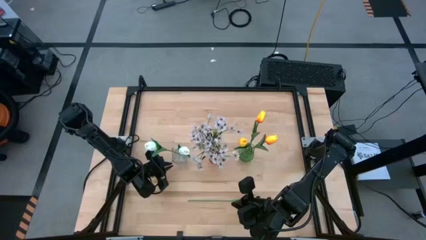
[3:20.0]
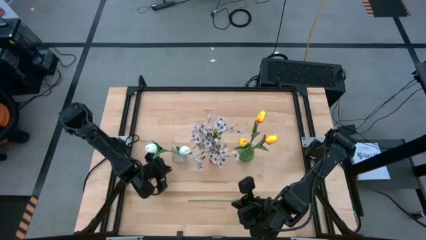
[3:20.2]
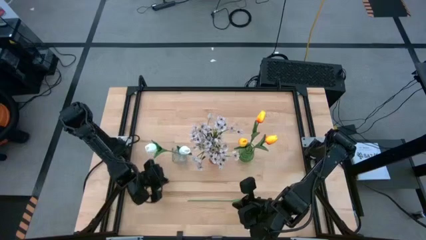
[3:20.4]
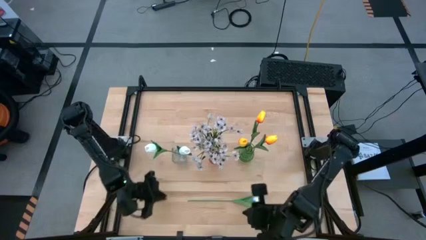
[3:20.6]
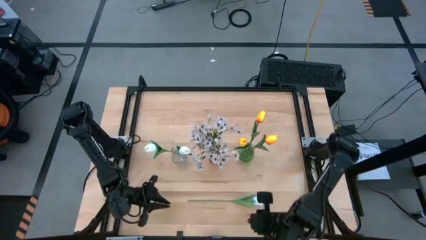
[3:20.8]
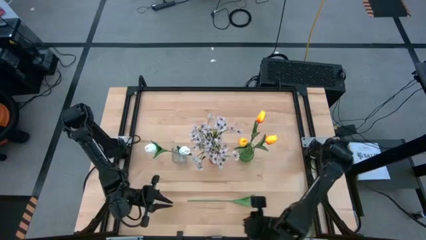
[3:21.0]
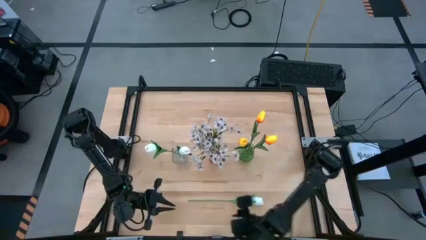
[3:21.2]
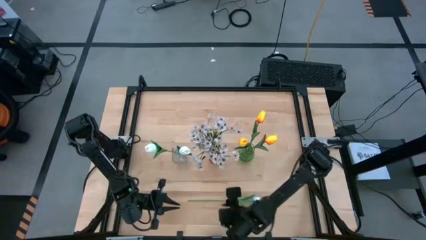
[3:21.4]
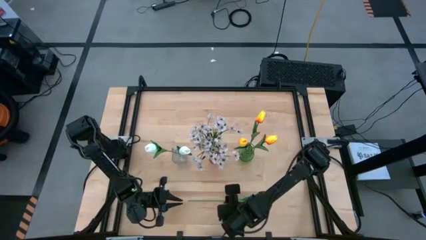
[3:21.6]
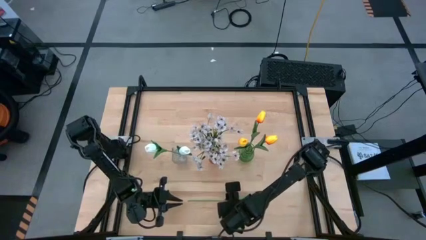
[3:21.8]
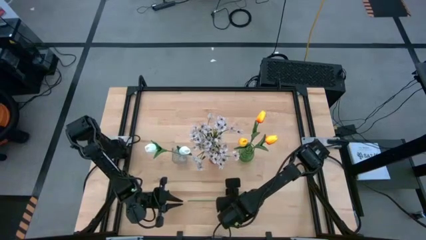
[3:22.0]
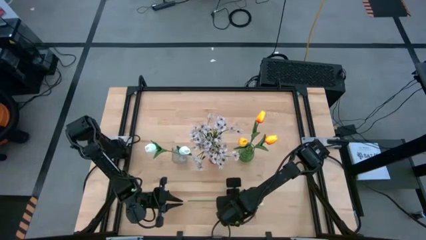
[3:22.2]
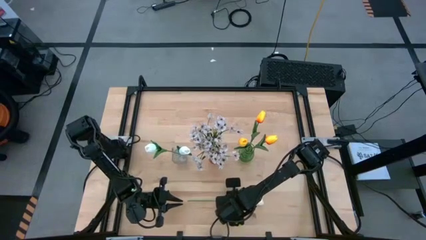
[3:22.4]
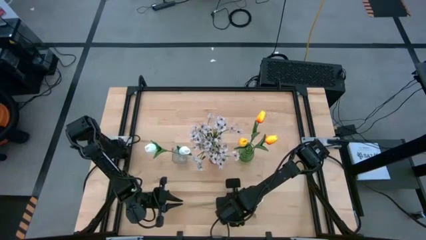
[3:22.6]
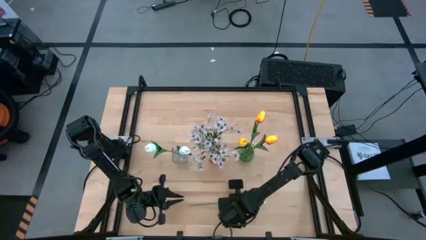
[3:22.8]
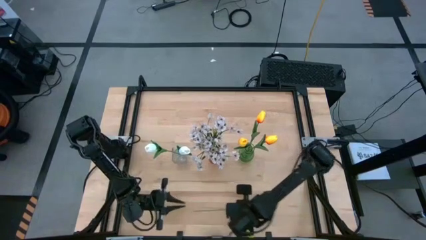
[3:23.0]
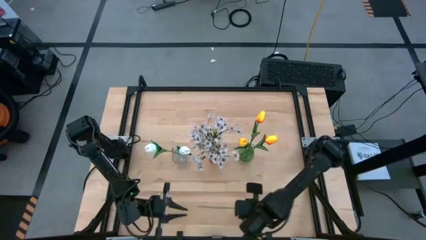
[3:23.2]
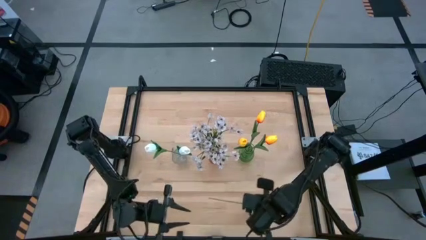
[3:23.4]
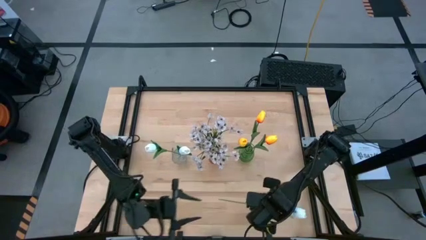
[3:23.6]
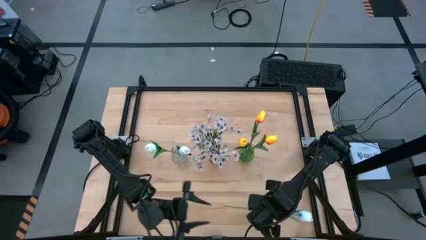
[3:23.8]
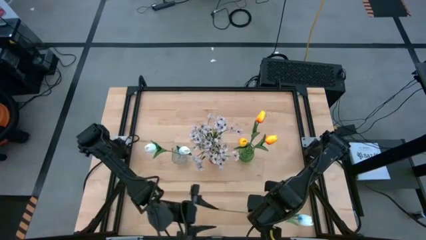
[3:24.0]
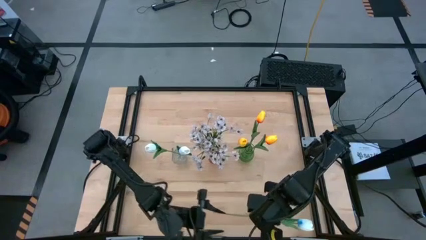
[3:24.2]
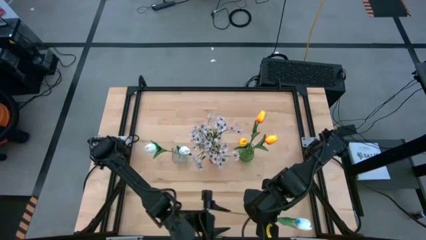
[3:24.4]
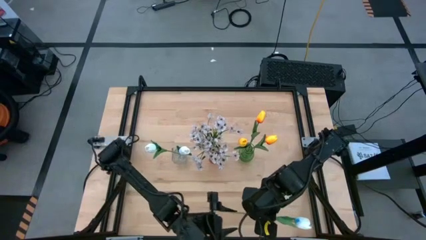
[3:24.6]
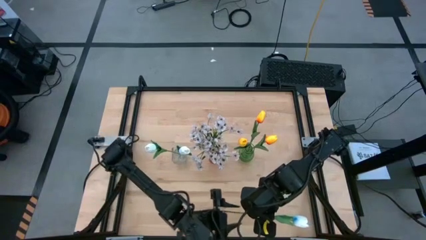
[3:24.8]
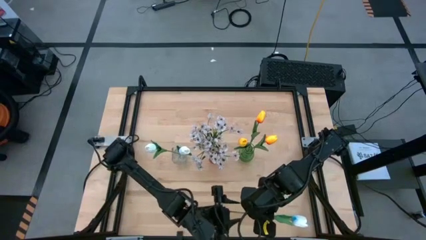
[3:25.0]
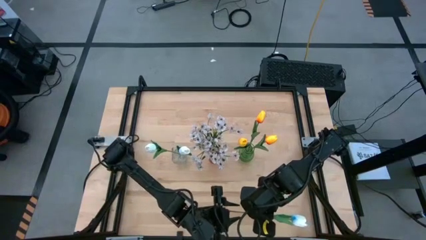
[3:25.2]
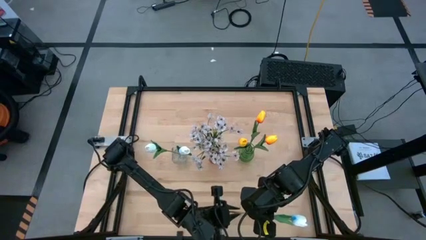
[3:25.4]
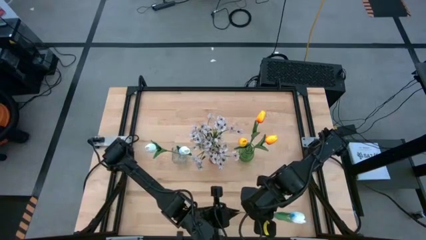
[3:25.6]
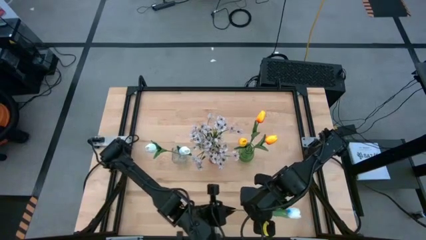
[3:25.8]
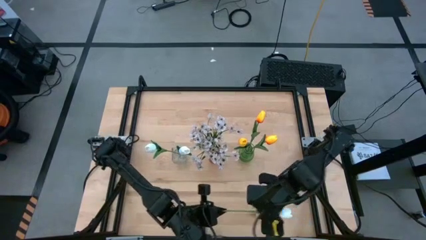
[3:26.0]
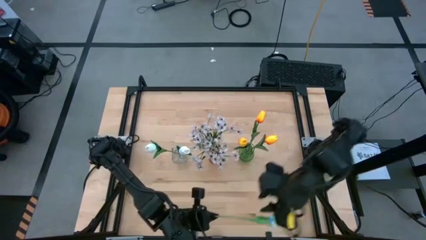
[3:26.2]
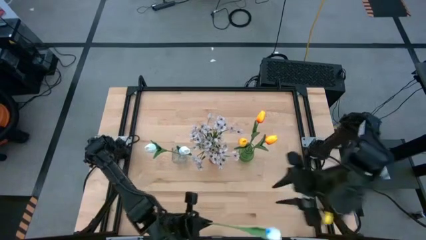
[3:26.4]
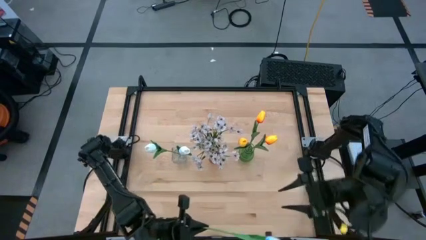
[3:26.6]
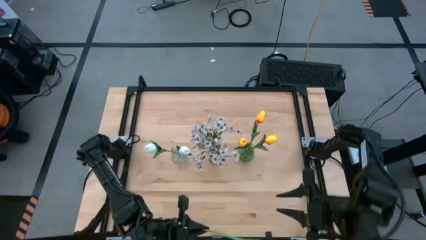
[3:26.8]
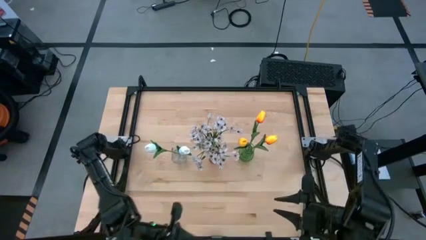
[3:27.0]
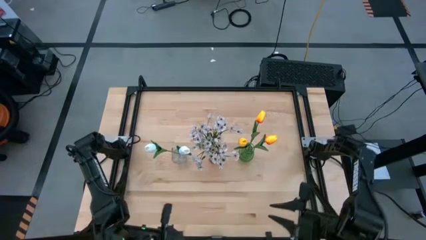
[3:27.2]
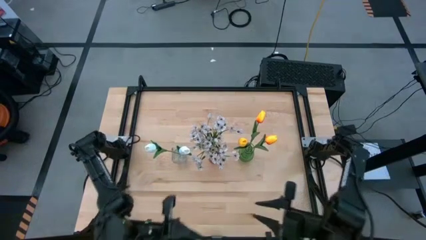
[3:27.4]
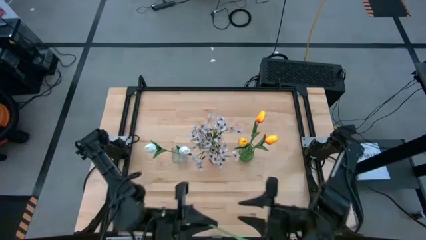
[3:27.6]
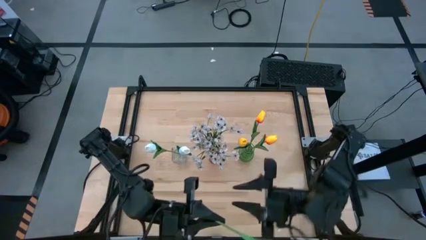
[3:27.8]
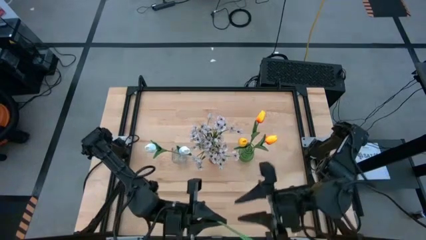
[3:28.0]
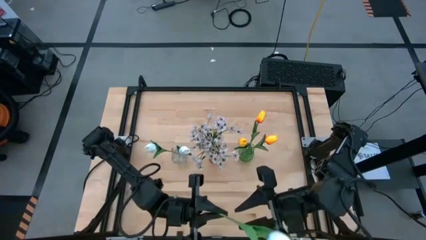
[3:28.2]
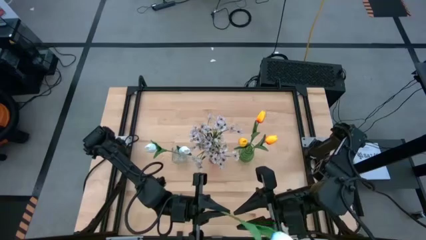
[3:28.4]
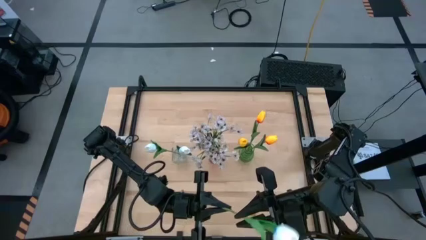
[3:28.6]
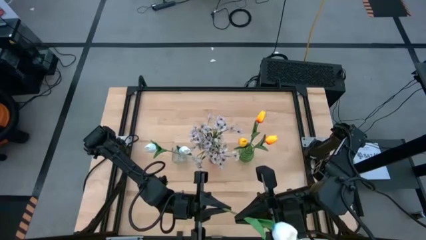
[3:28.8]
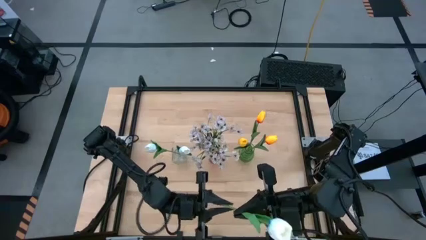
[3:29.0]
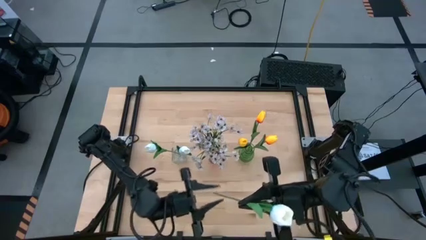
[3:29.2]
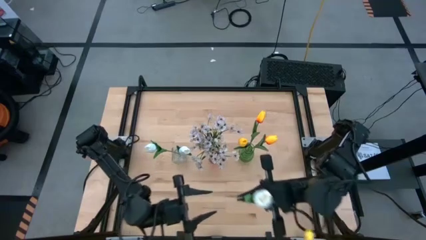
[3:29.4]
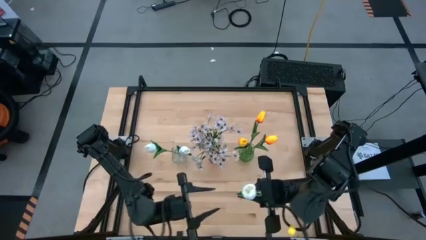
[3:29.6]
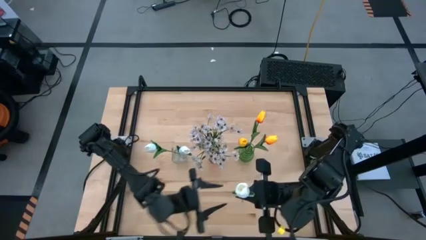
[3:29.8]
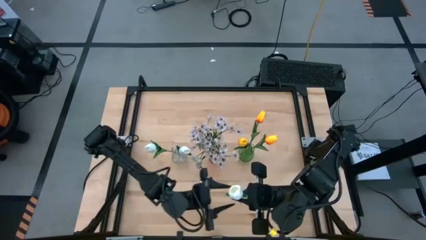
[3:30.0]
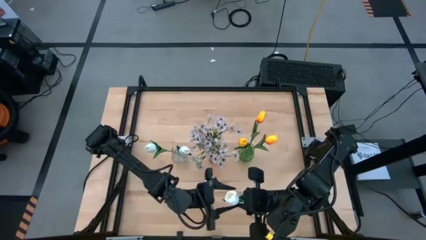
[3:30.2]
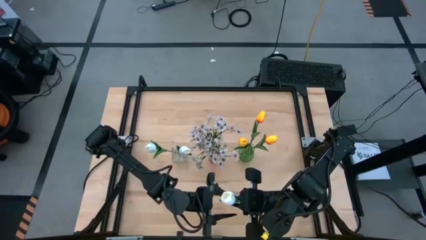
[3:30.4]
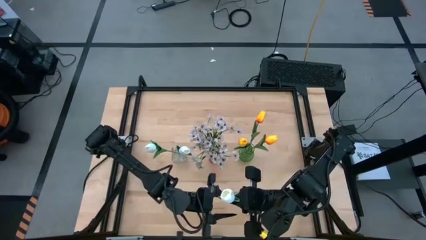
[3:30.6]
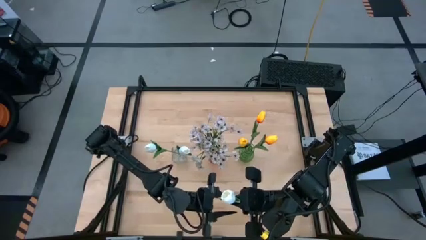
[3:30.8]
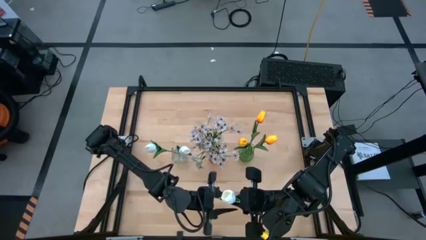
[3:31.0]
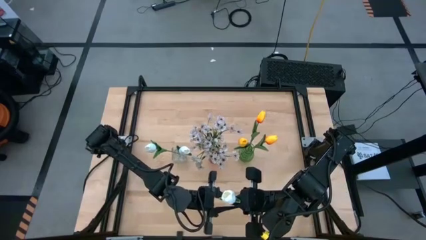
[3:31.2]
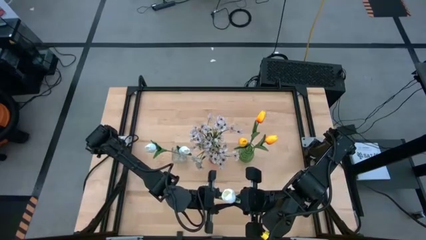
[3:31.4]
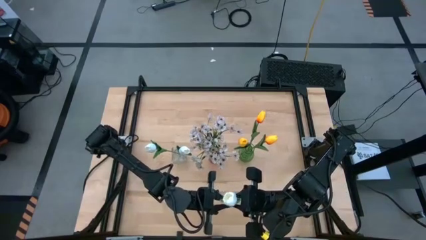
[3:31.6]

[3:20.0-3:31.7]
Task: Sort flowers into vase by color
Put the white tulip into the transparent vase

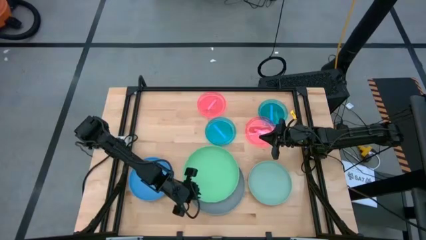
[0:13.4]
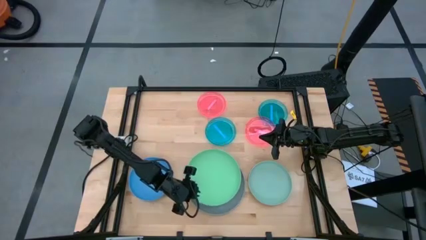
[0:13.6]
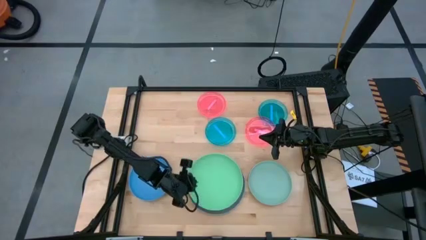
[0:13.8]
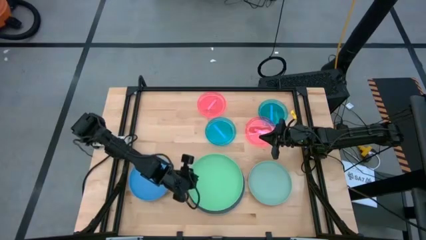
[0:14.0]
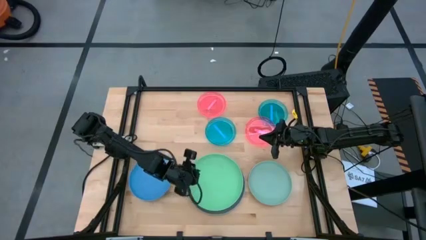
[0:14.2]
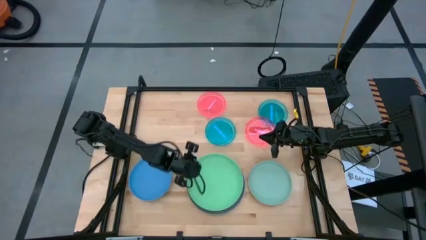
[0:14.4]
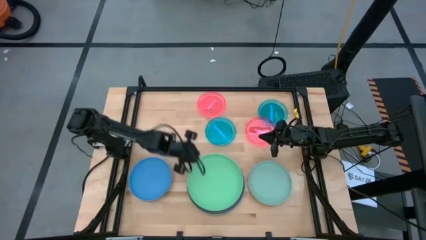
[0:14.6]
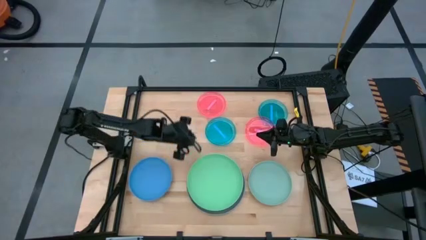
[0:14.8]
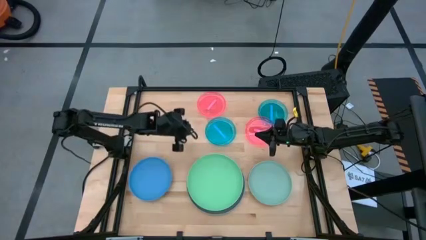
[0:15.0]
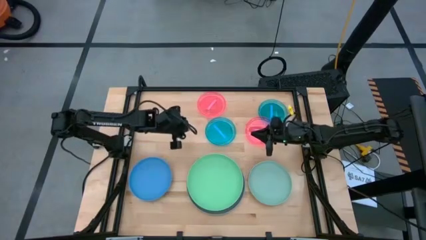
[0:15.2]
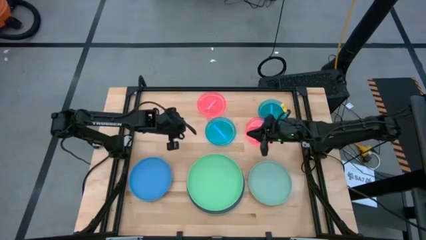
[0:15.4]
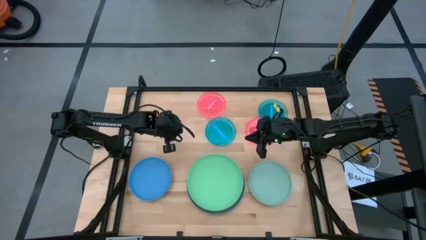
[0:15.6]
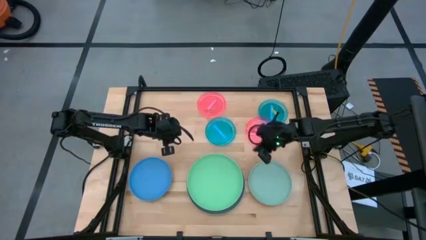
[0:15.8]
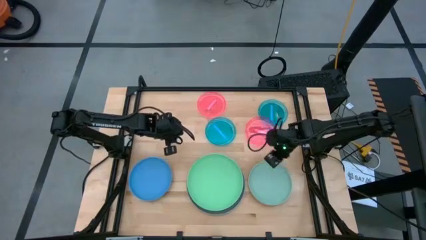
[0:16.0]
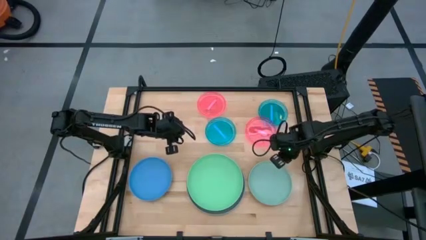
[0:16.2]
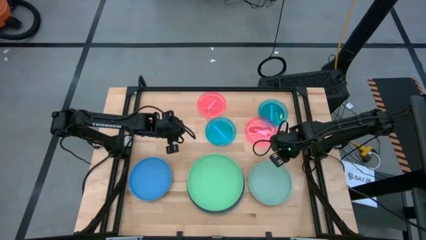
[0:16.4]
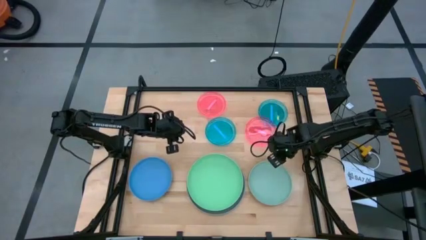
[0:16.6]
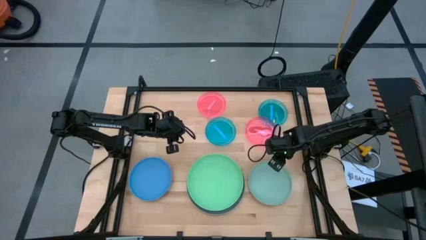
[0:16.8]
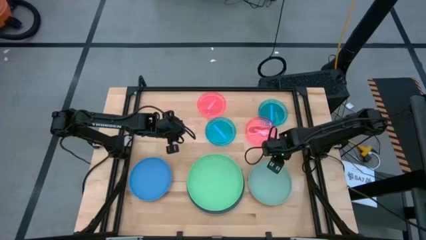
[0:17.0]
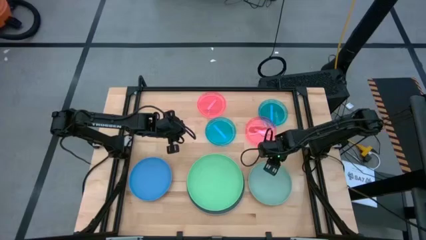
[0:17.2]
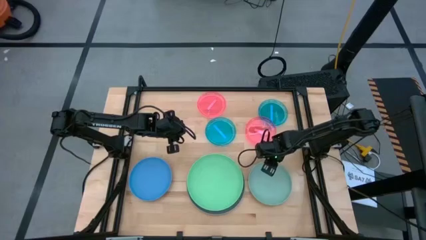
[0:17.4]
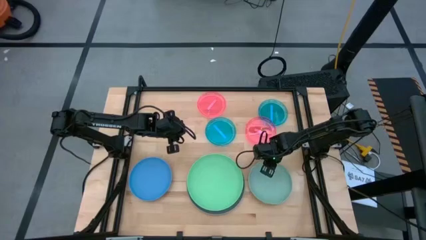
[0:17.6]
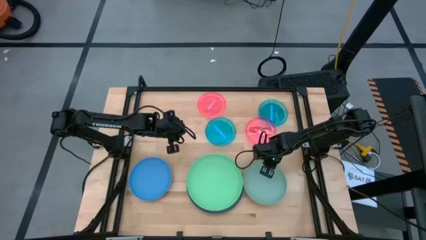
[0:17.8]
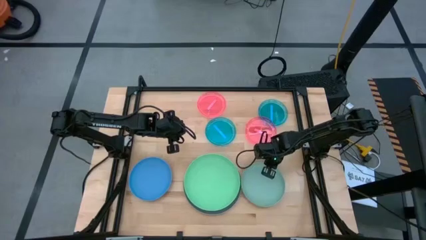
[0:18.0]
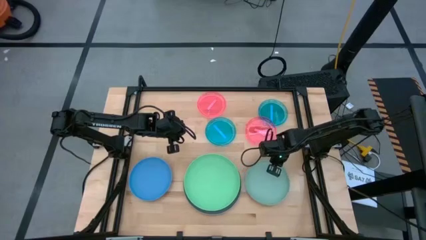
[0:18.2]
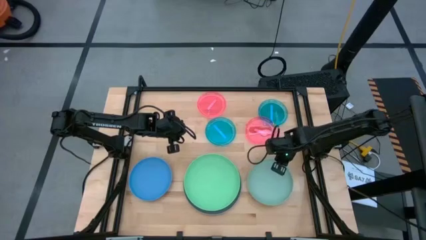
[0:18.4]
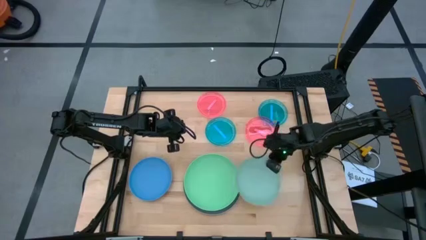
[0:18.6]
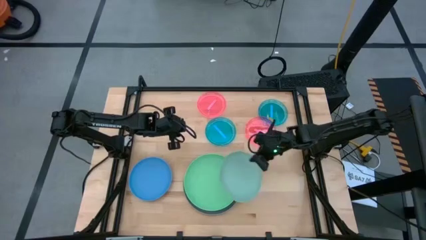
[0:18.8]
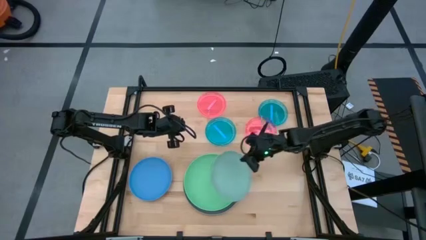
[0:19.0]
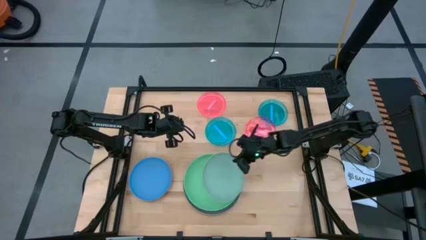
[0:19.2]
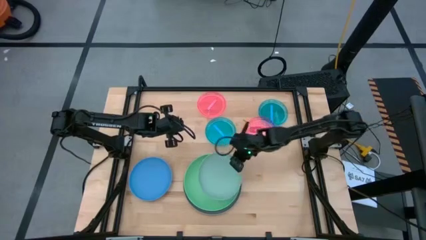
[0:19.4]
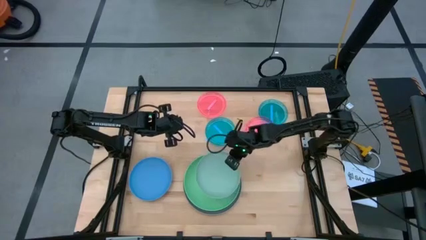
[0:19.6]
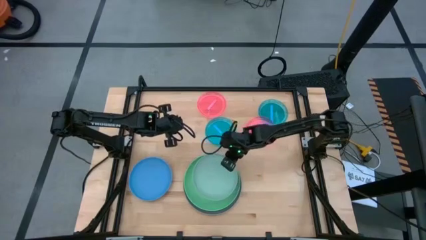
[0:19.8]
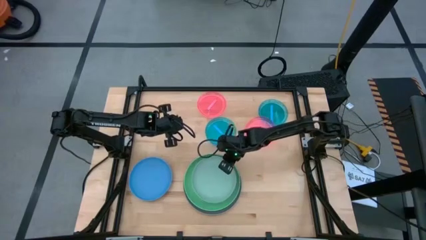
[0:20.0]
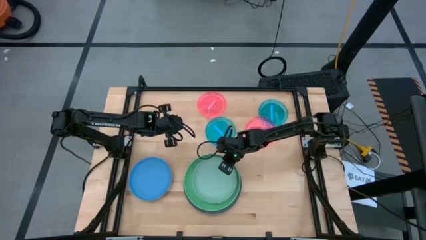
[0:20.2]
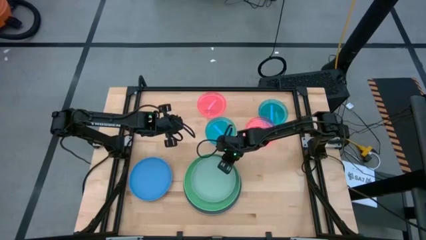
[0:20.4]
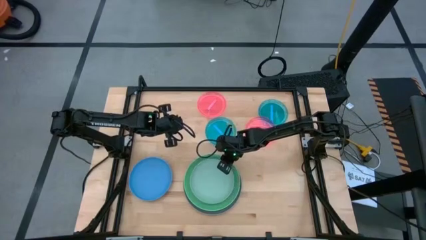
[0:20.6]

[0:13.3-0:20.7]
Task: Stack plastic plates
Stack the light blue plate on top of the light green plate
